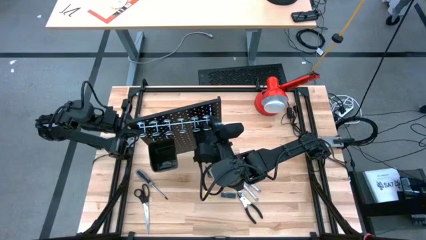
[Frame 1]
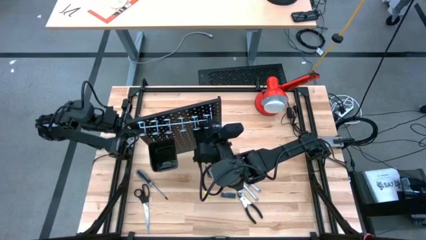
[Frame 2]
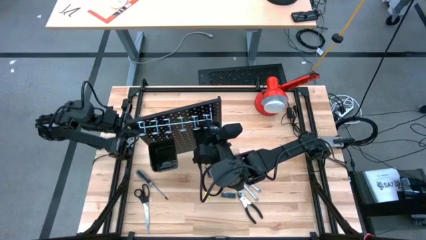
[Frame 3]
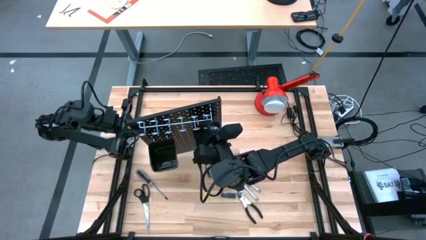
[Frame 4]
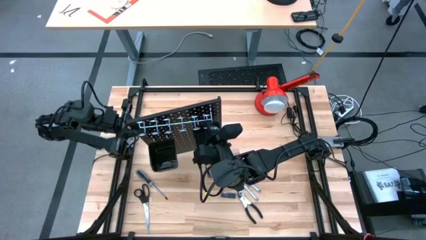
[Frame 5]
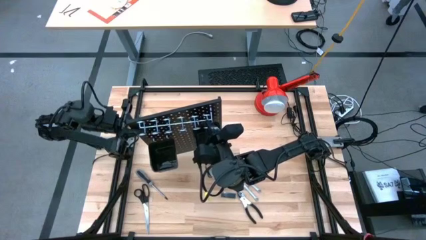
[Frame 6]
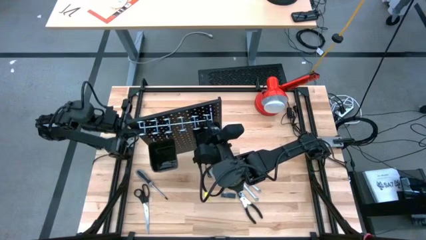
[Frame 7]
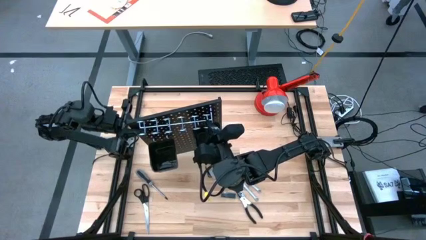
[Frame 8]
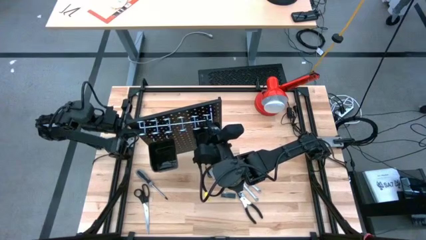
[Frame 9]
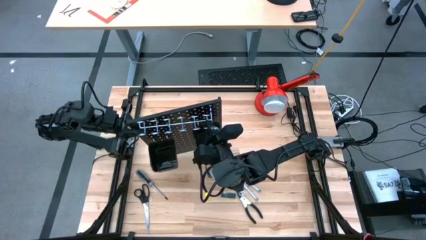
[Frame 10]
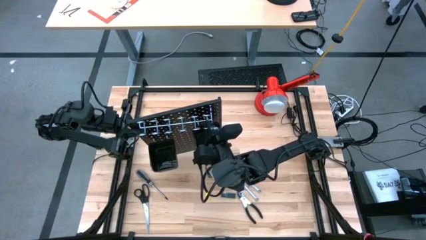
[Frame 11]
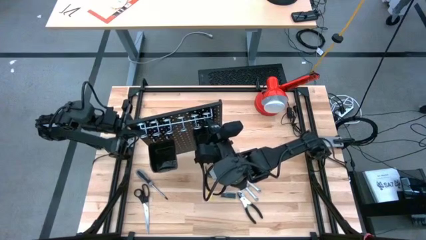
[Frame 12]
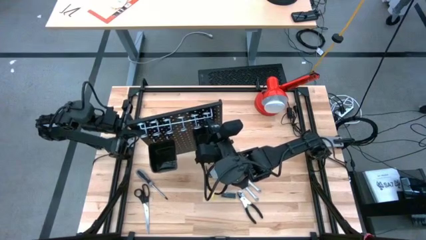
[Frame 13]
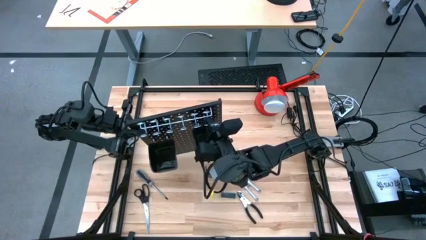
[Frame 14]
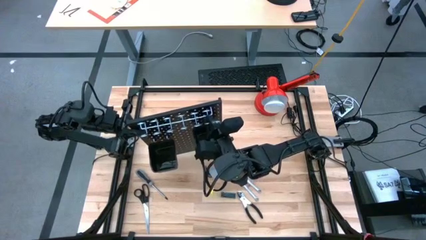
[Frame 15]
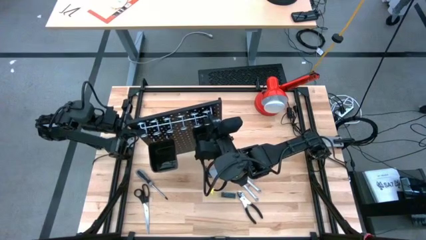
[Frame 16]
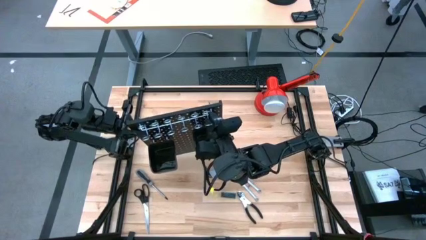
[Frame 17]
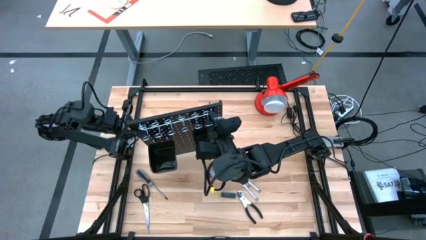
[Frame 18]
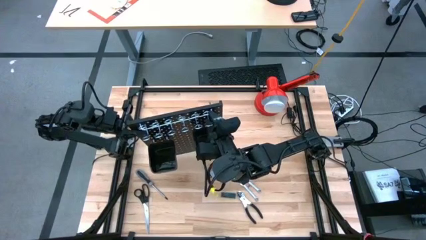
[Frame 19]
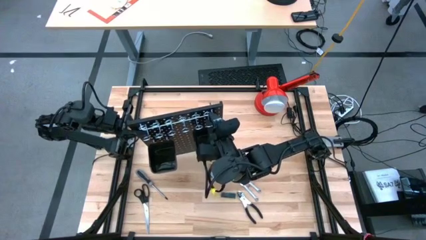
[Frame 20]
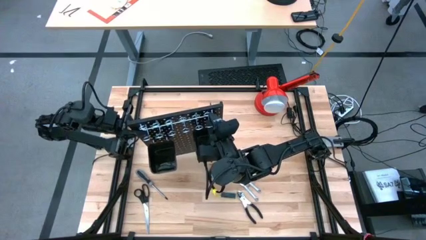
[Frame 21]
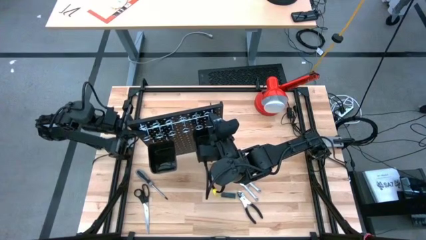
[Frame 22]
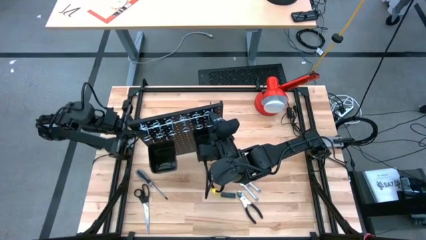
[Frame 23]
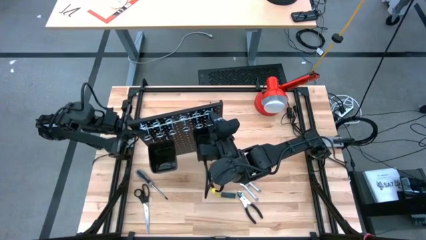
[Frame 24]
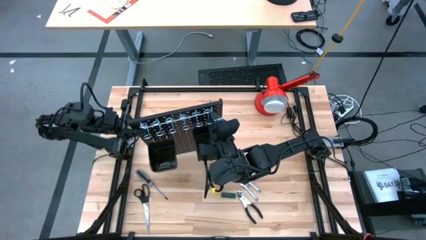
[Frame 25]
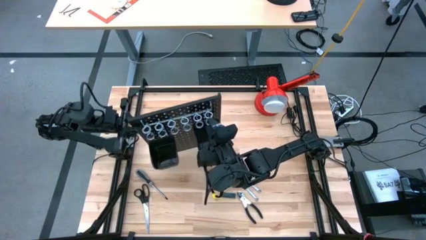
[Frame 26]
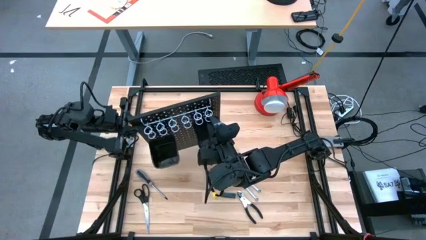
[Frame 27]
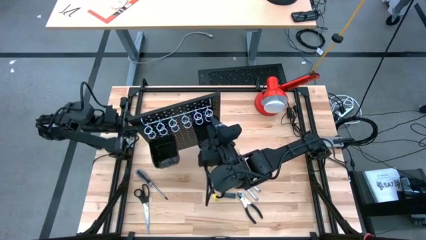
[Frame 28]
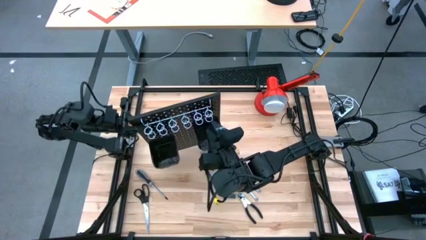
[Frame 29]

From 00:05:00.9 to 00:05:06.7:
Task: Hang tools onto peg board
Assemble the tool holder on the pegboard

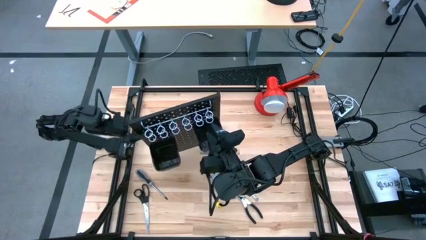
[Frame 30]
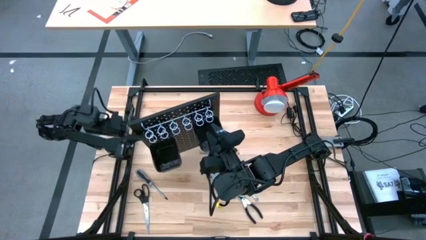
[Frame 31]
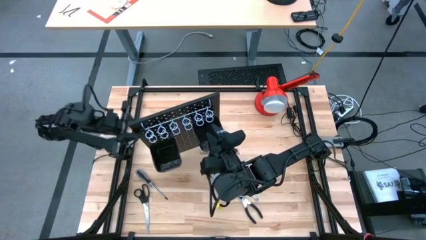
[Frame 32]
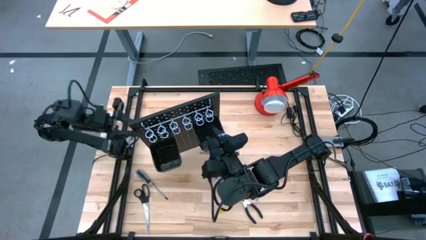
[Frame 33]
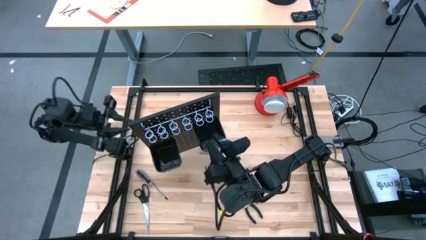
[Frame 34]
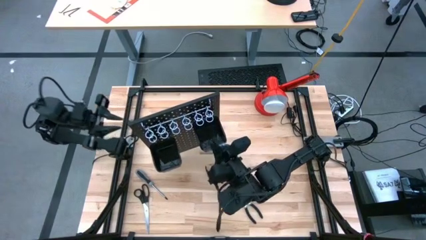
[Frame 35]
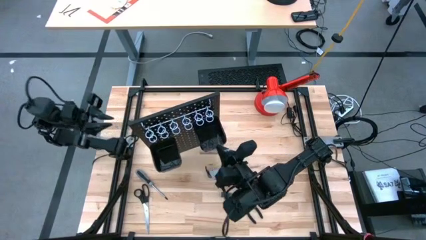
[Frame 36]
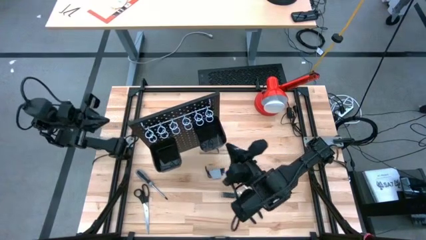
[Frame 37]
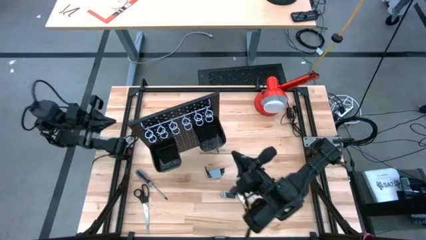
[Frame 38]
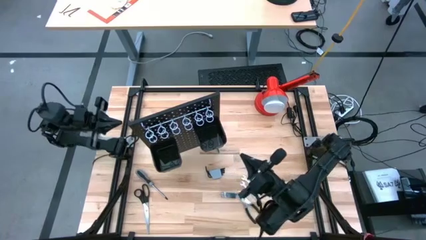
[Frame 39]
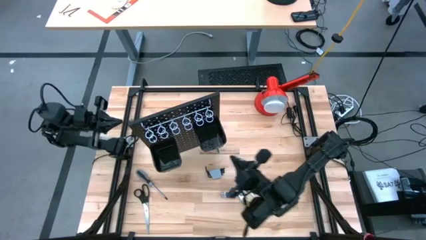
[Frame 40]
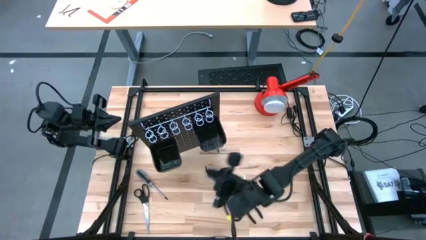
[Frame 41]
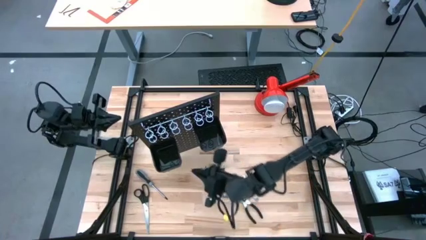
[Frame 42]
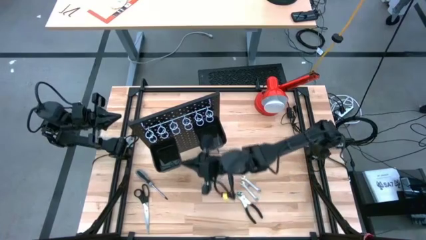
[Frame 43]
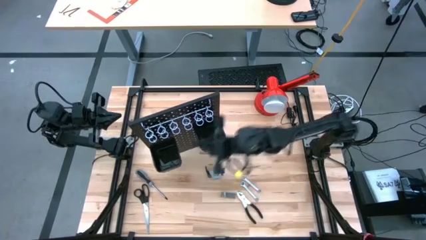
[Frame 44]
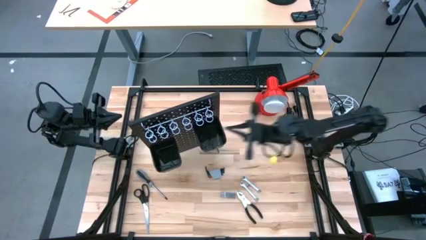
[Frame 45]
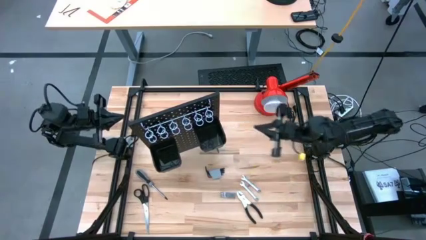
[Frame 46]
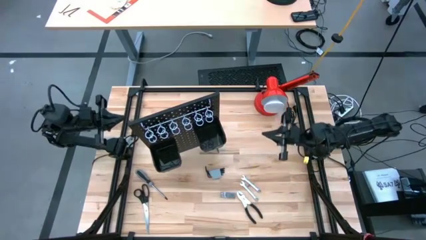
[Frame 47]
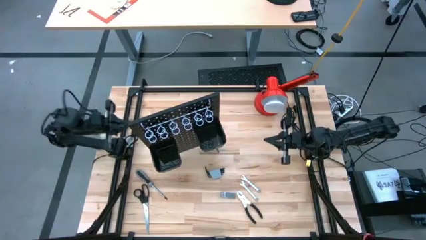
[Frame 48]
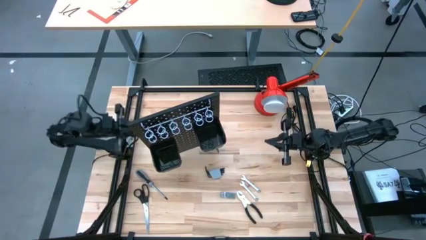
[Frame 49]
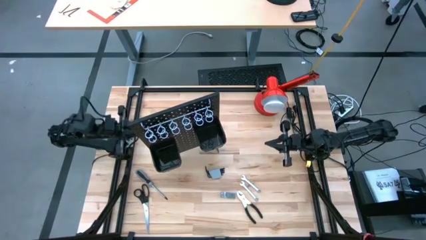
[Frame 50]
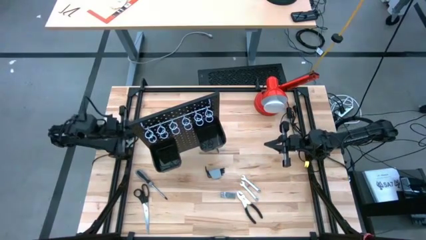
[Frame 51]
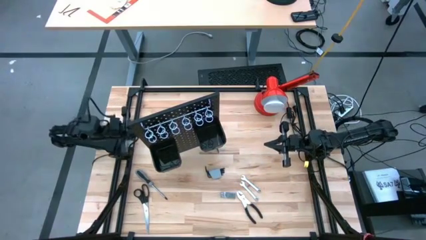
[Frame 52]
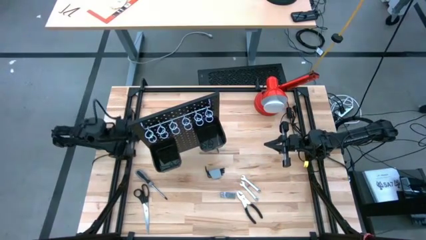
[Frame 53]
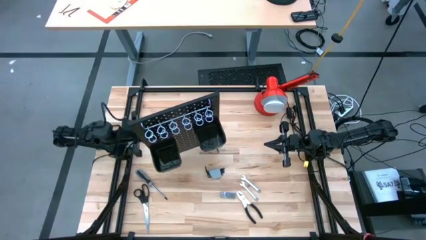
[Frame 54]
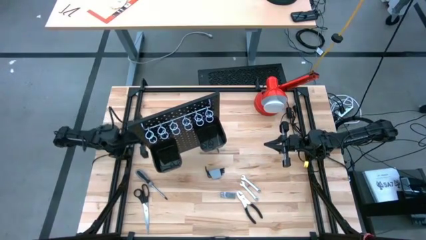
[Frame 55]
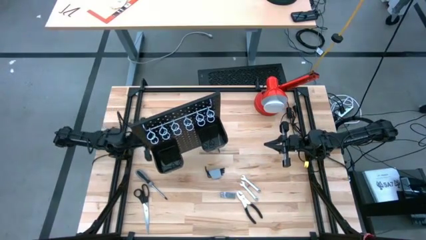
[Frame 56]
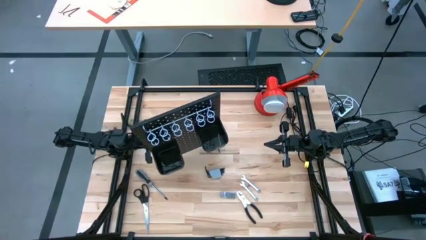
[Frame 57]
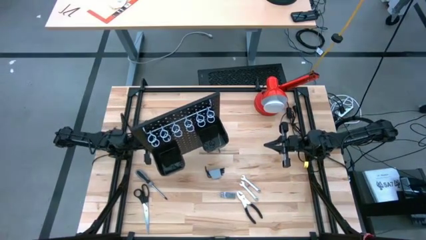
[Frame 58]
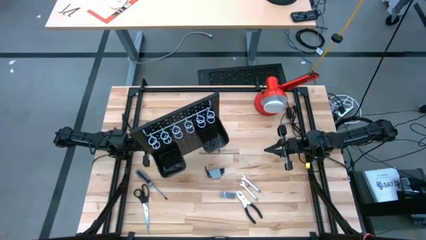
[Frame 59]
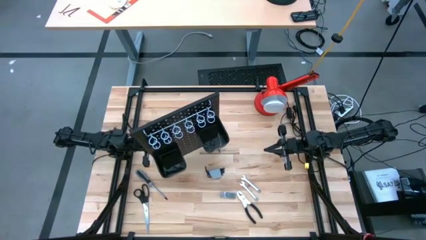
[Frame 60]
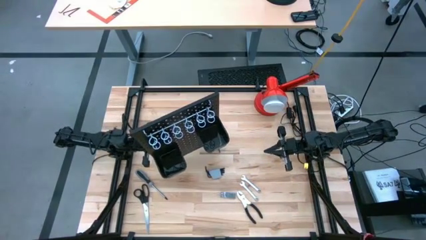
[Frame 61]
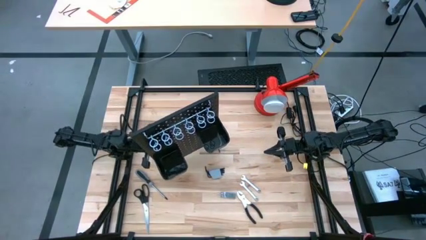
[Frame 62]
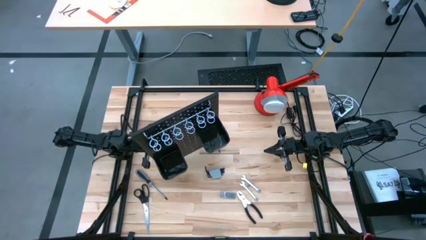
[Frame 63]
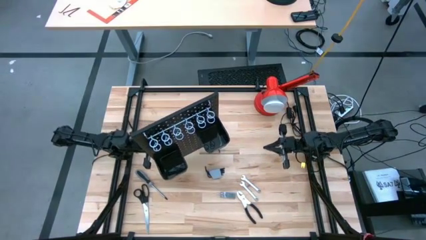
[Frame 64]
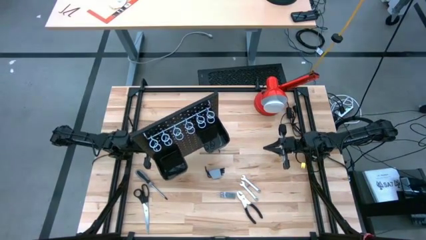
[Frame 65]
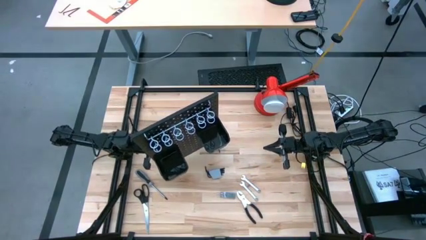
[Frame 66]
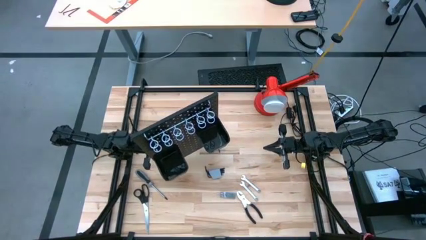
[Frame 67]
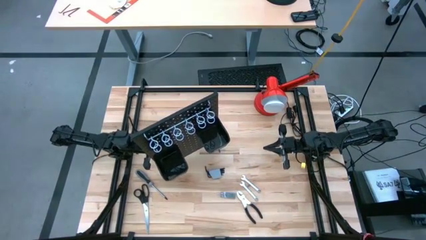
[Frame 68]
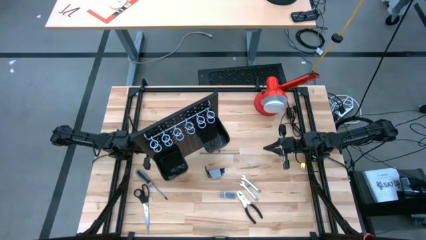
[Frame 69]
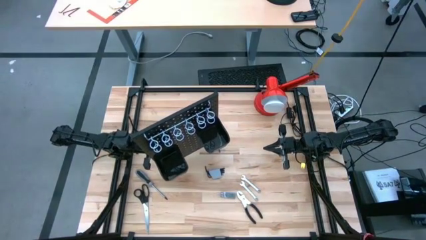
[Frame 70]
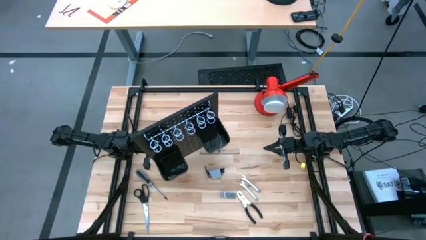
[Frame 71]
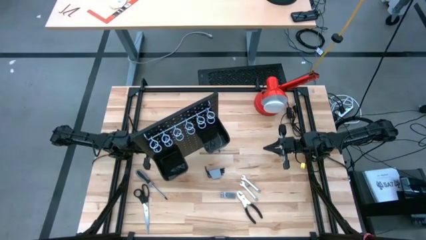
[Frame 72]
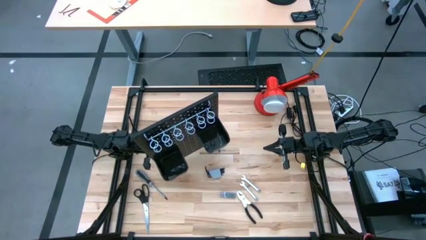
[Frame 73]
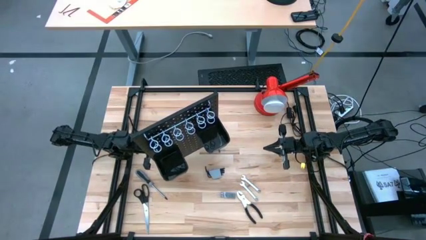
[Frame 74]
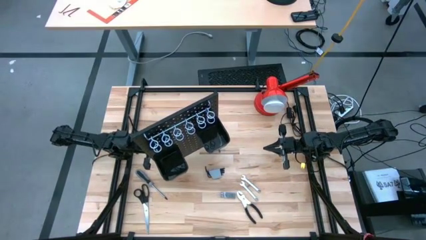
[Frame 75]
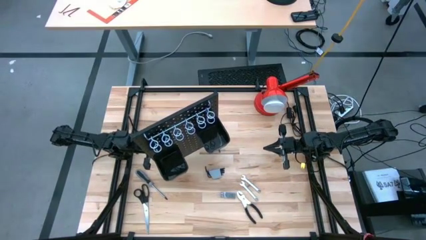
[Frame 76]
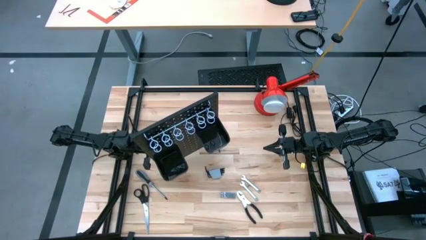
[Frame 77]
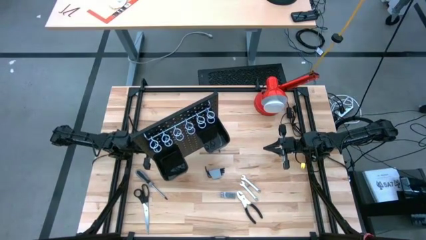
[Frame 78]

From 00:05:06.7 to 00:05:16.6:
Return to Home Position
